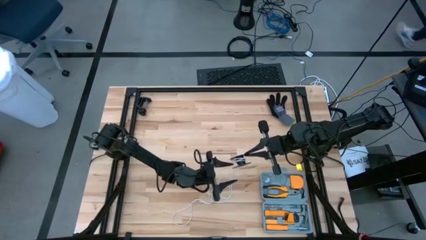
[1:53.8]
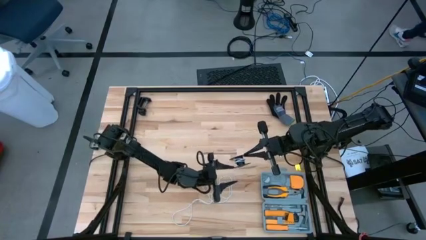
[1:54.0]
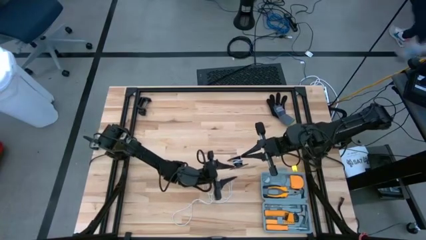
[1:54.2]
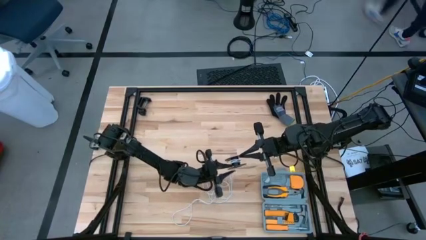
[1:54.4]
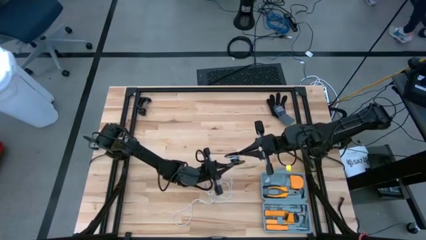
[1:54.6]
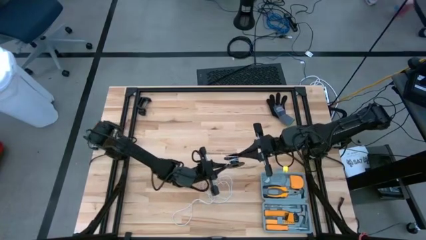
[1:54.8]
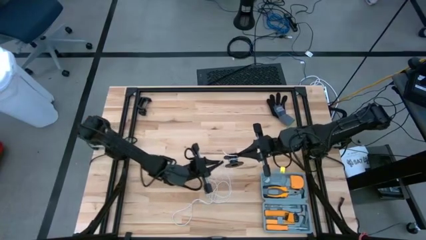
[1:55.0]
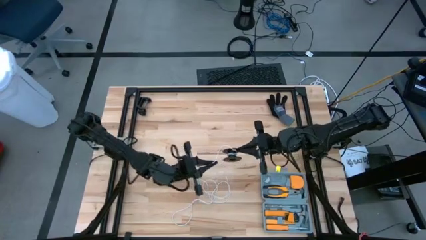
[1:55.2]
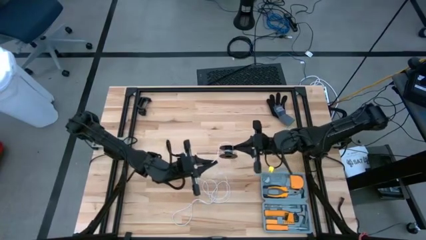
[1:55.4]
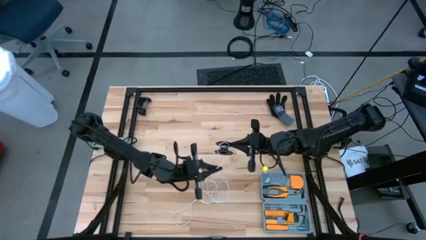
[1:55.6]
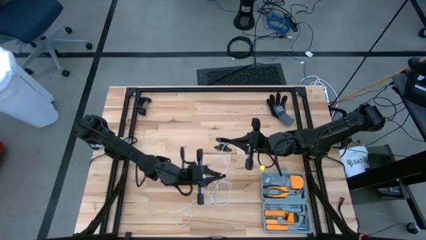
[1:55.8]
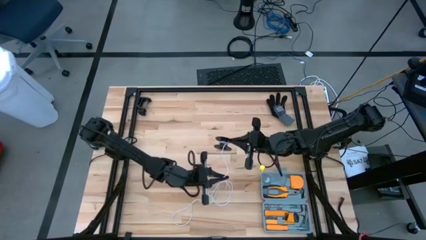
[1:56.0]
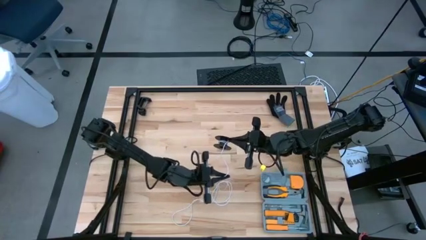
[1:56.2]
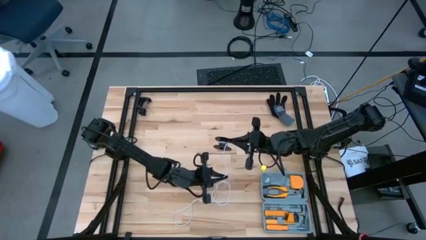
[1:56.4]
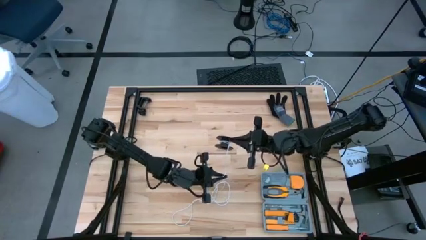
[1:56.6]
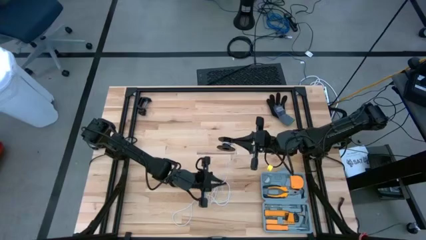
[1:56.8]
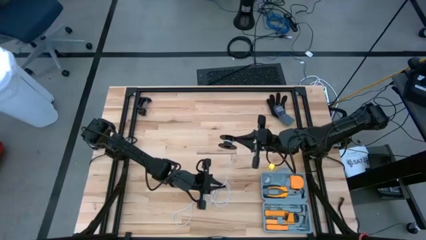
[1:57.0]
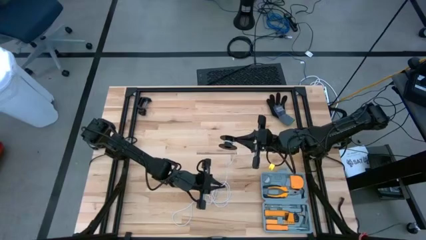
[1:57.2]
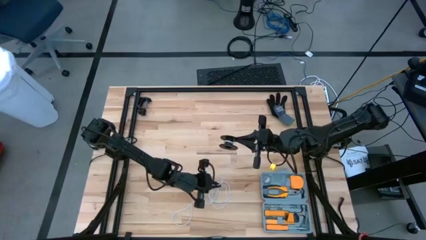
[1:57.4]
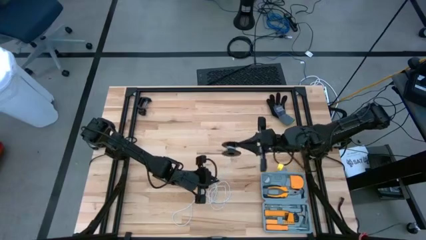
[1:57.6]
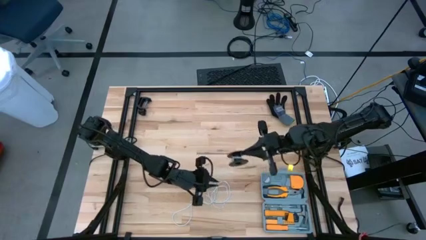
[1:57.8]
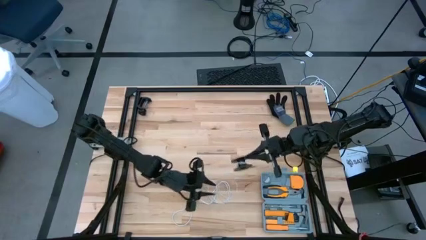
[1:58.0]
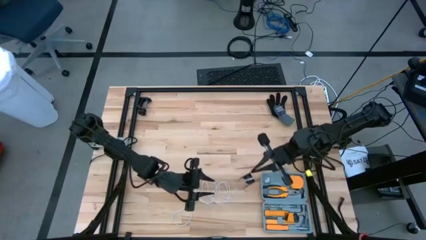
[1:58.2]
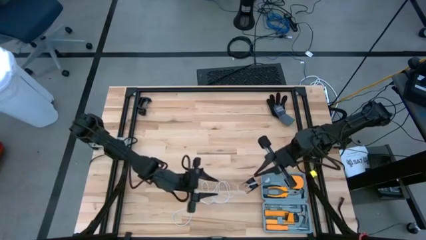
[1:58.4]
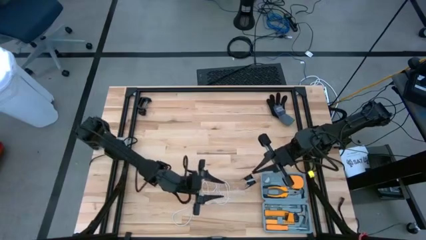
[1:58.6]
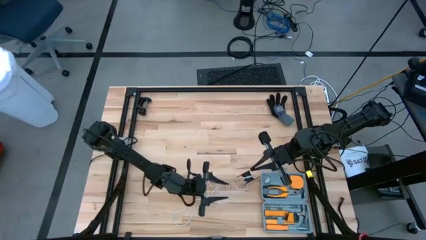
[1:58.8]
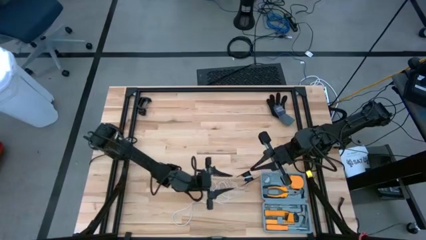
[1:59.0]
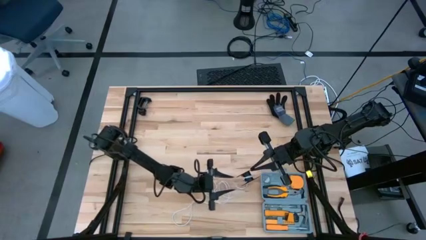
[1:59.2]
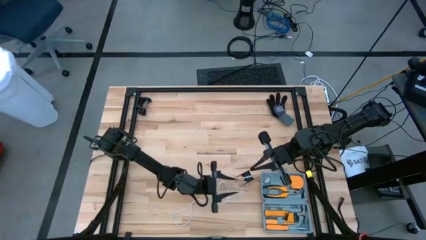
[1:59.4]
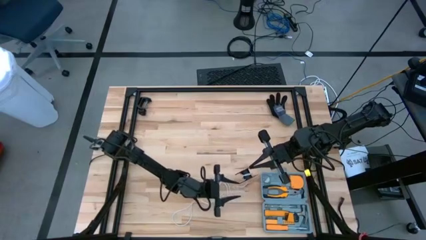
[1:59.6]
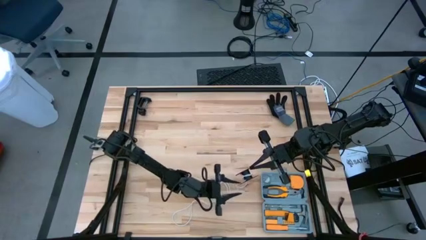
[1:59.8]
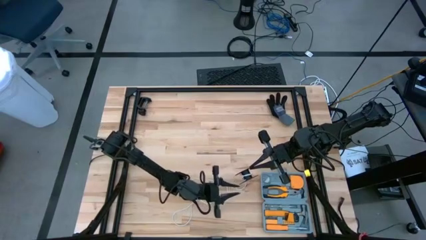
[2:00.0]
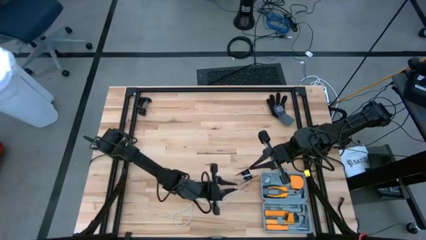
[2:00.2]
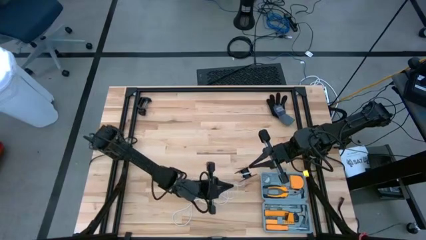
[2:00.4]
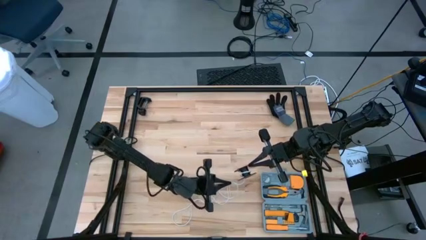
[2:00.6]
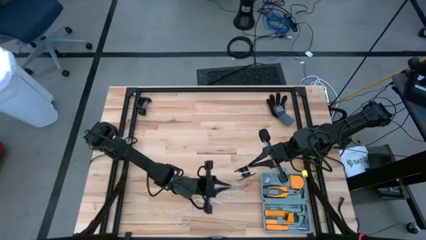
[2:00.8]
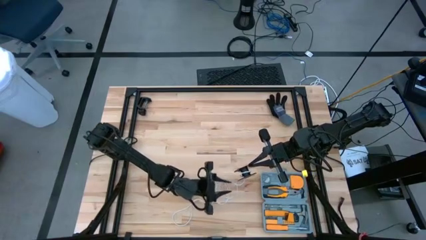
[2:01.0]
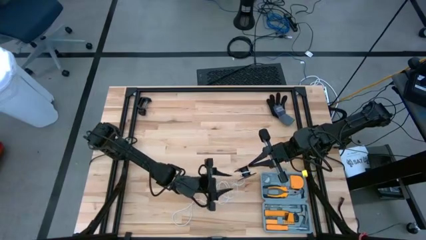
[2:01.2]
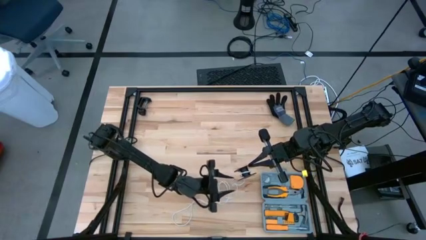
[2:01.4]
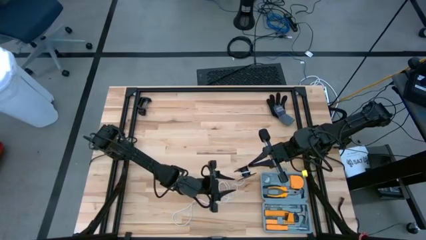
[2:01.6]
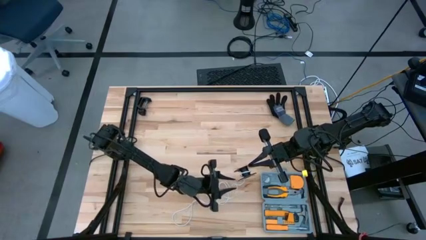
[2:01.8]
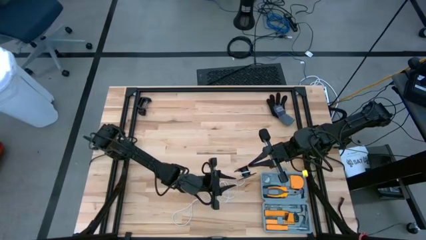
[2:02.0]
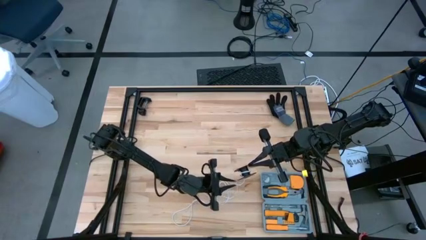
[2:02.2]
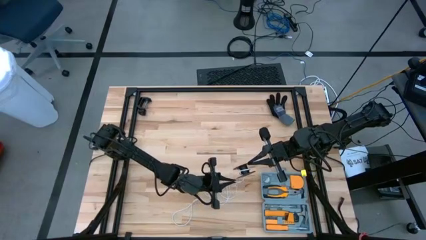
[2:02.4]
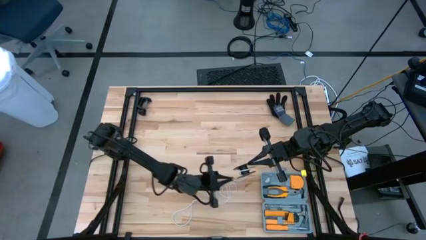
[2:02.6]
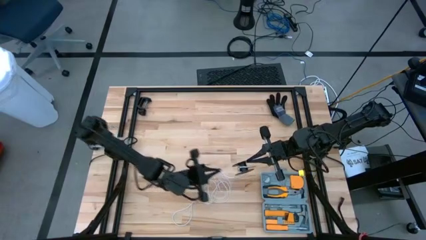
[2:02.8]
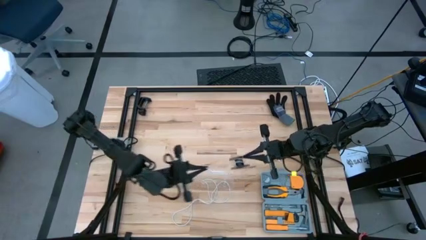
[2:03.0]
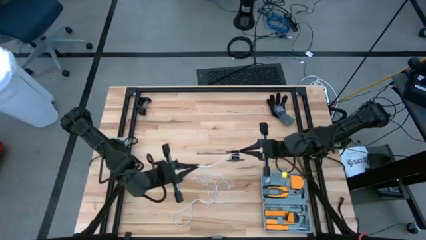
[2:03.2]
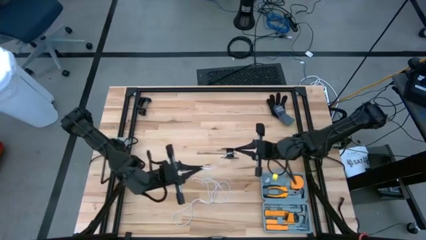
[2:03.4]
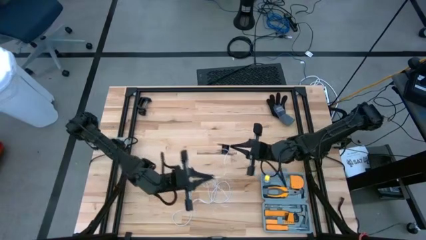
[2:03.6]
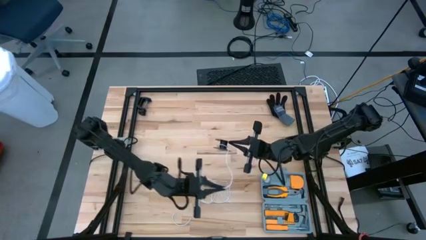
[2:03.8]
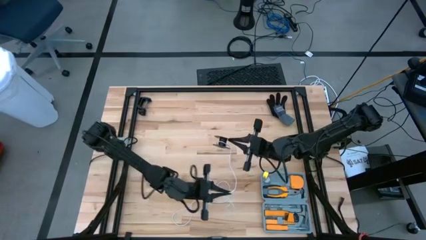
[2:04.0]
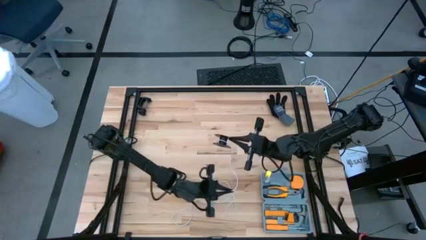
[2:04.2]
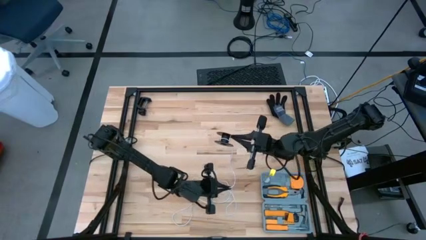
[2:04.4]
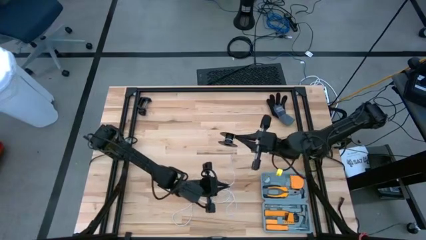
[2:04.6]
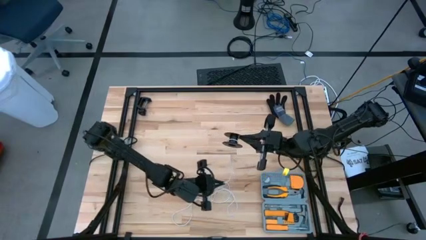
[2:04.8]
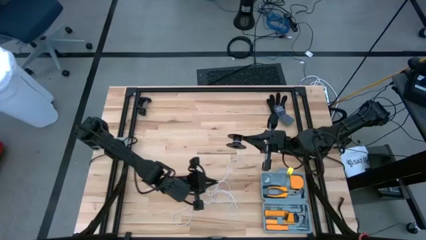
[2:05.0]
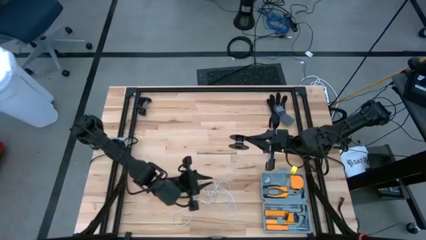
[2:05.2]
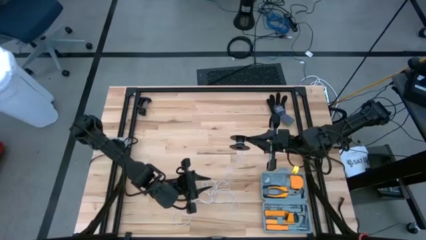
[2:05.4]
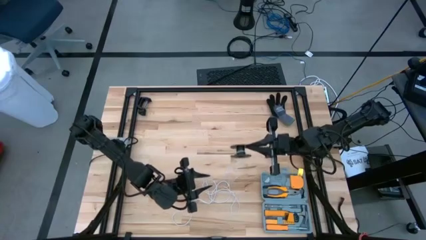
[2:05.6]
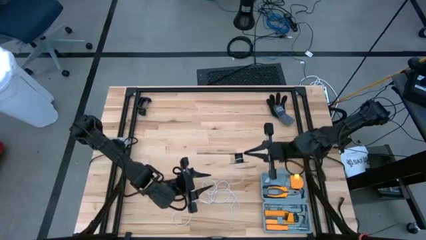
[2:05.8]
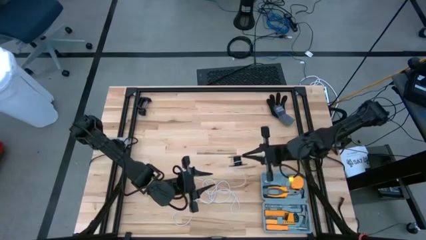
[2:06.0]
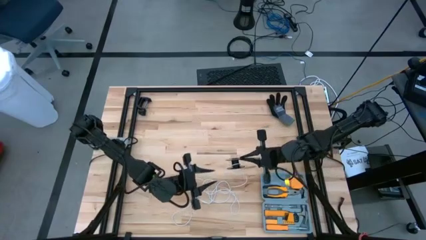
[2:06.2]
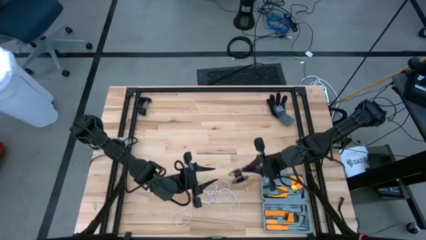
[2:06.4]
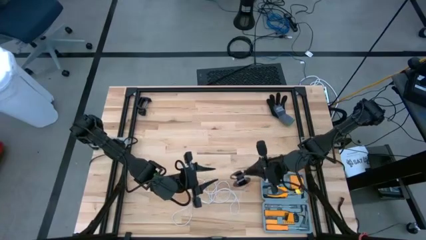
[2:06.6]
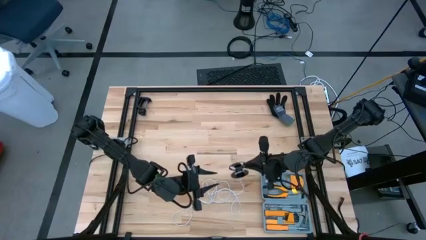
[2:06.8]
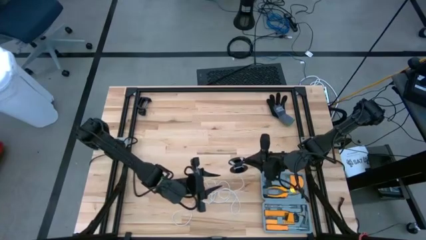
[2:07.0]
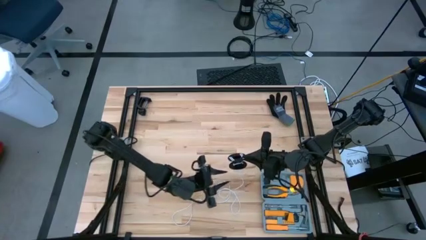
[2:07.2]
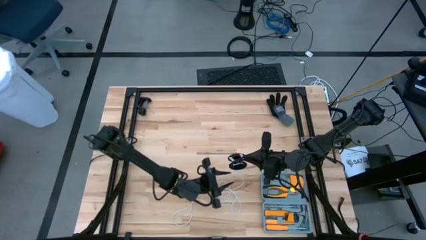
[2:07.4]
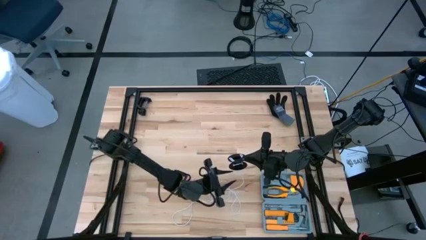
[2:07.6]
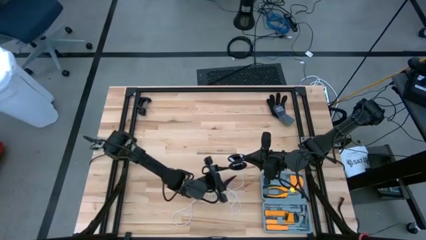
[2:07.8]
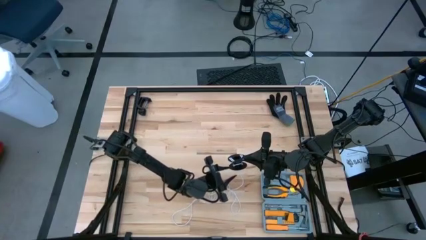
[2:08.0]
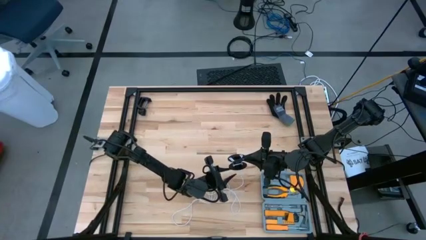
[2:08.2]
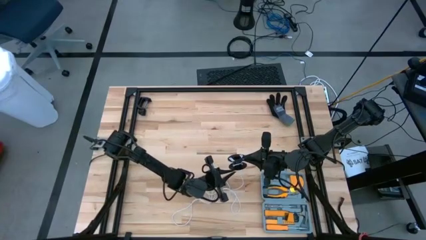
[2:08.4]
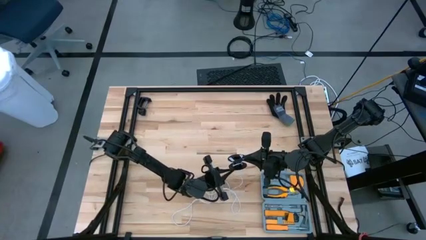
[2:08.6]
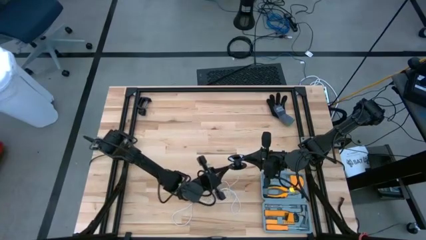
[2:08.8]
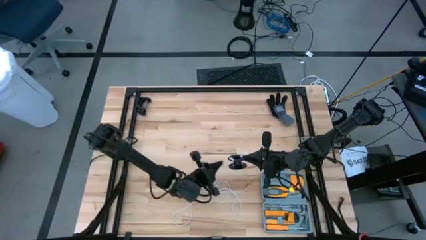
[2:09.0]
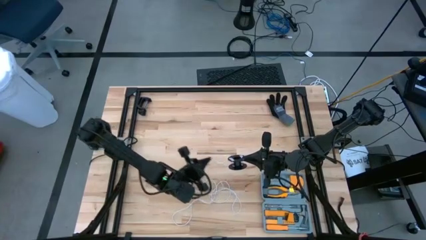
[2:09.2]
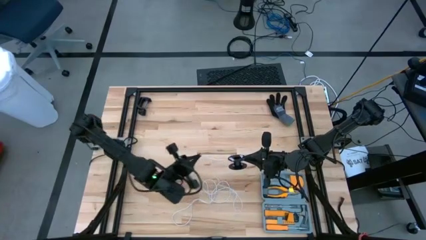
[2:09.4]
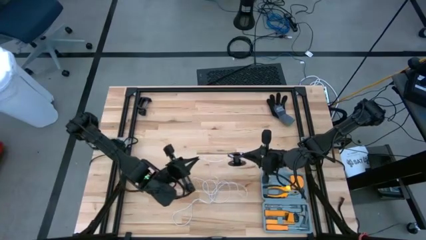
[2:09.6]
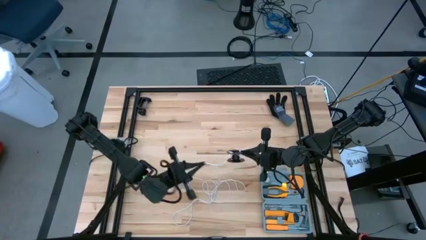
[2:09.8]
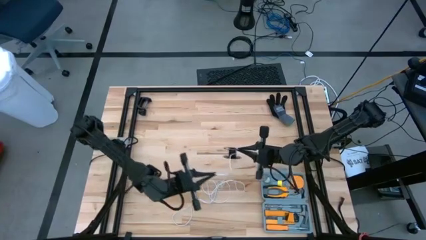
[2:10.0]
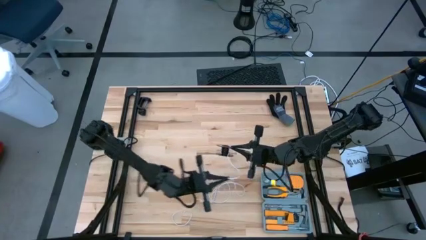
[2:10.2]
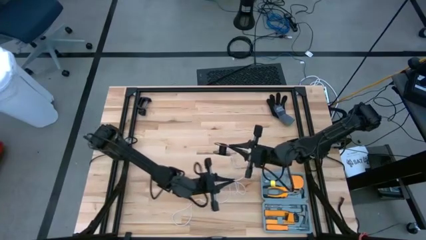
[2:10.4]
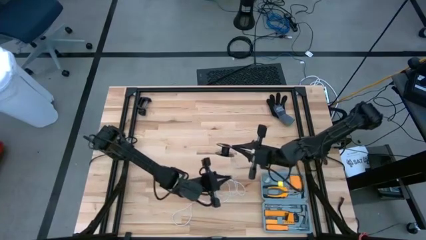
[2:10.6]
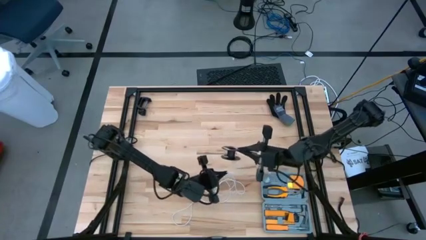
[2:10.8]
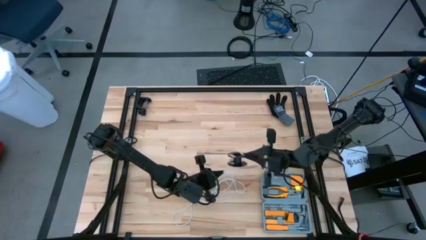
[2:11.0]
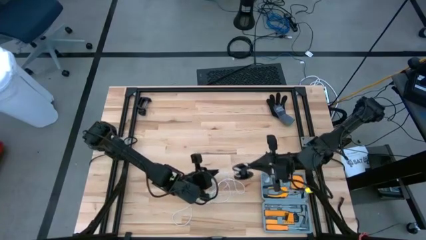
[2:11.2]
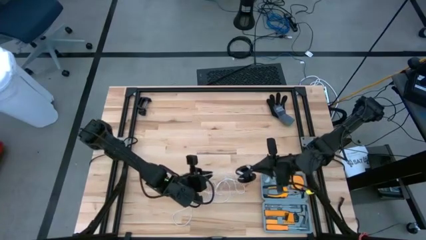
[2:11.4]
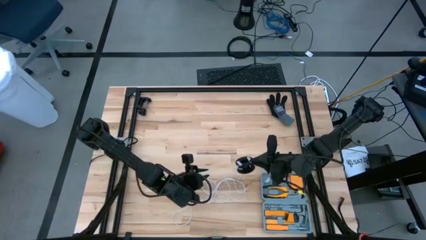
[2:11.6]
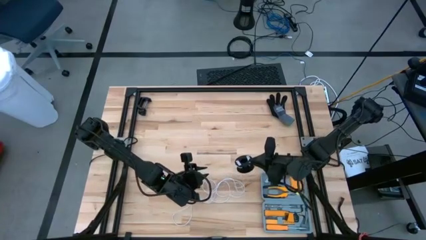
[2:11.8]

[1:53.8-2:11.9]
Task: Coil cords
Uncoil the white cable wire from the spool
